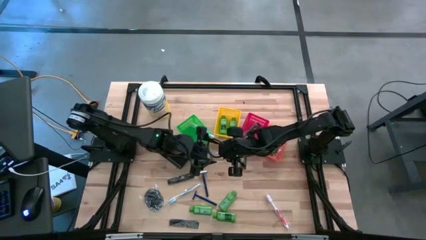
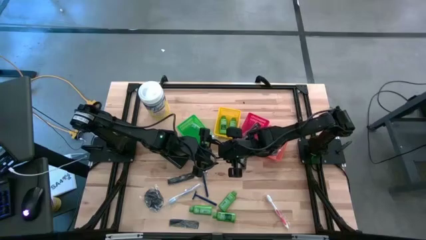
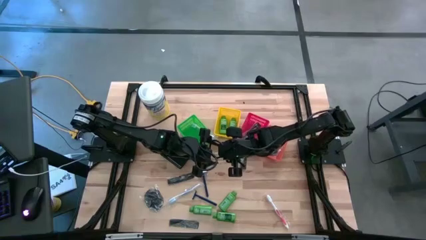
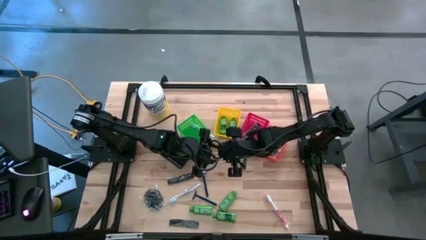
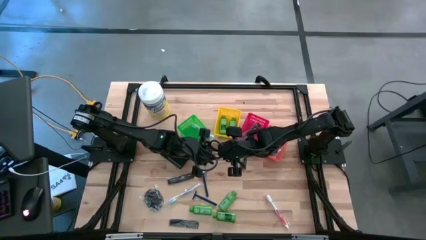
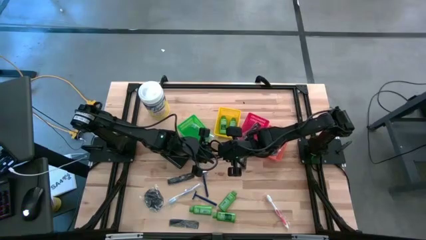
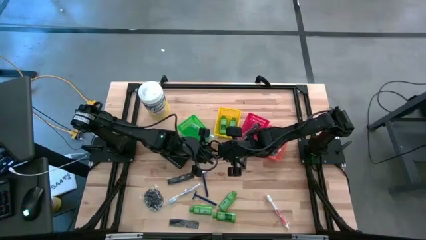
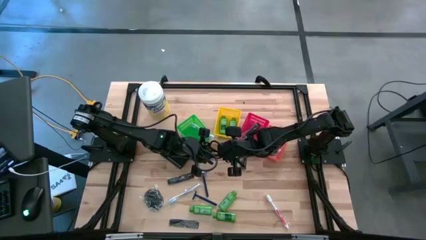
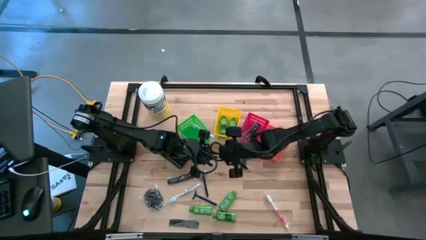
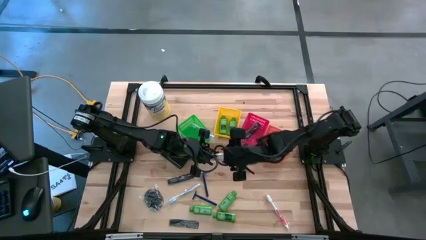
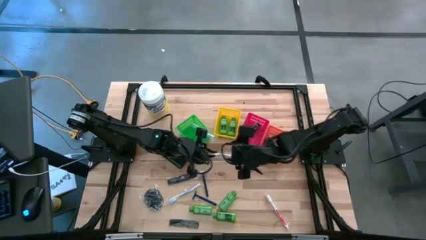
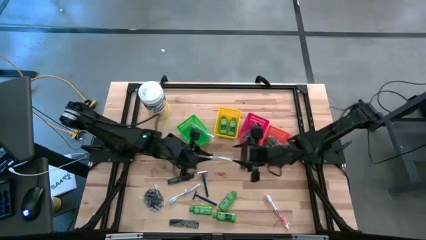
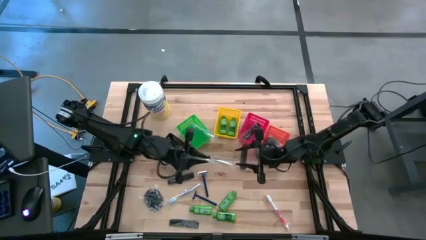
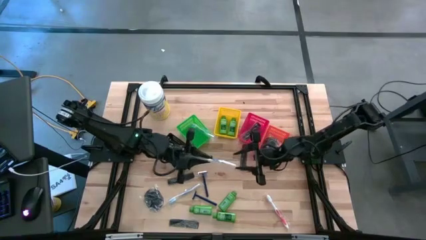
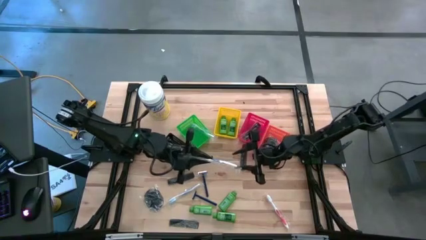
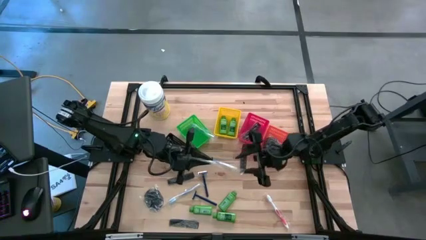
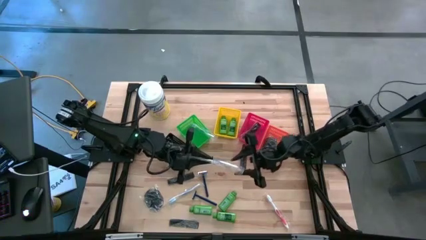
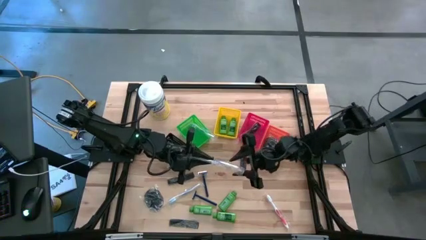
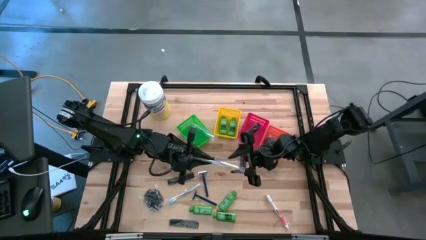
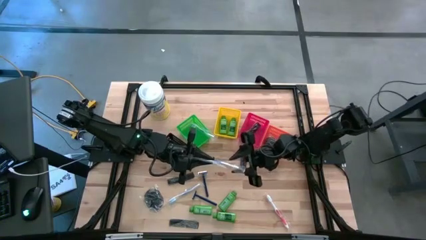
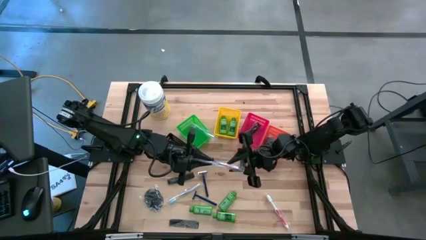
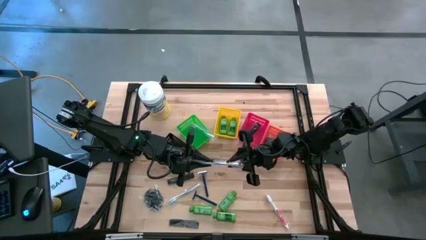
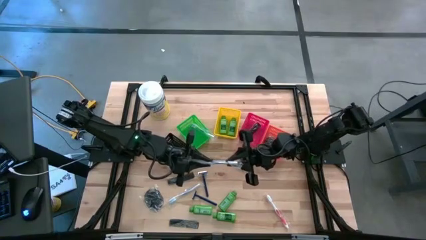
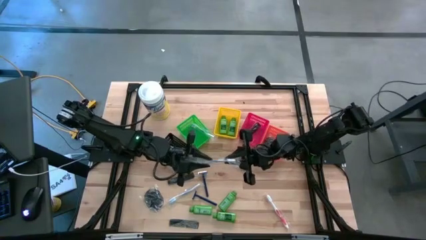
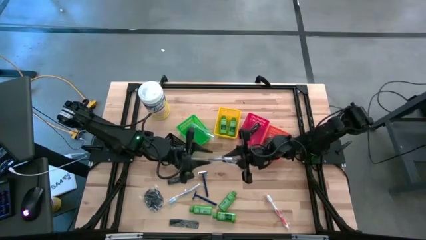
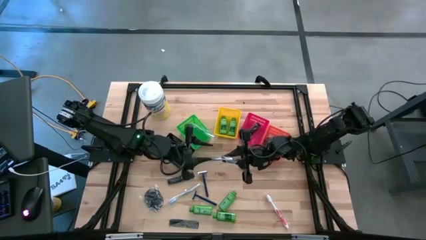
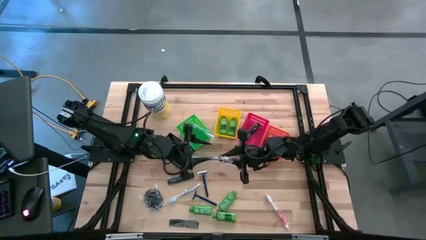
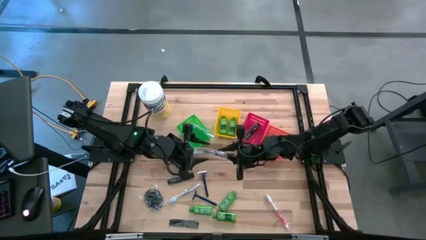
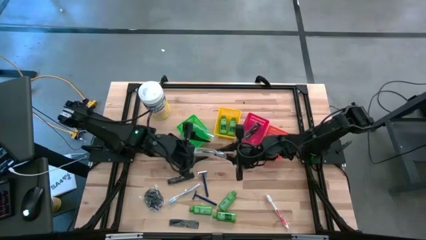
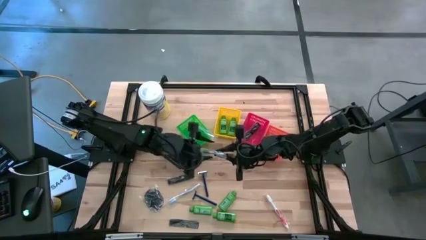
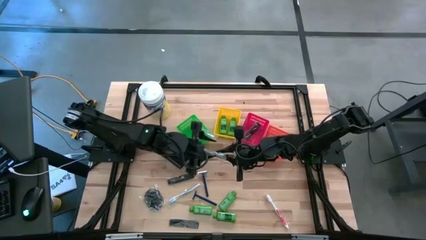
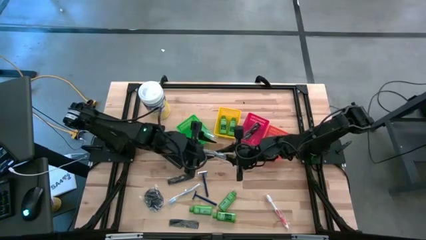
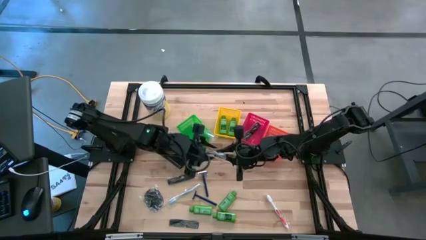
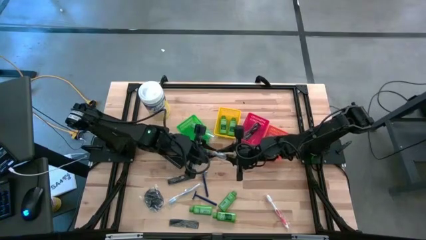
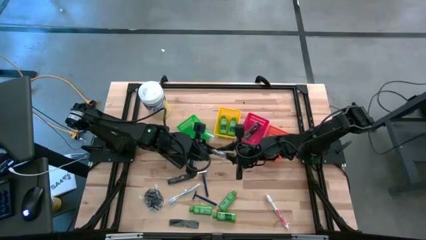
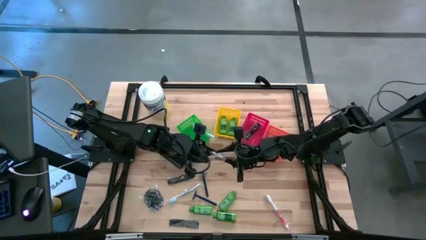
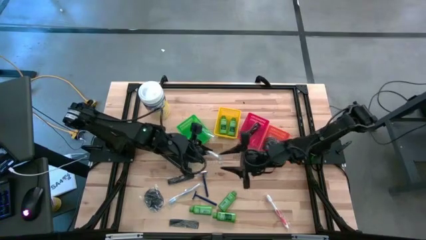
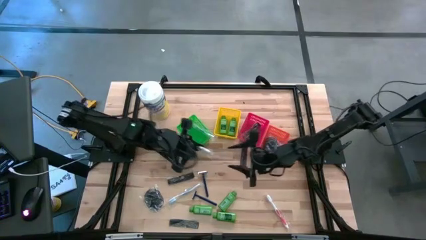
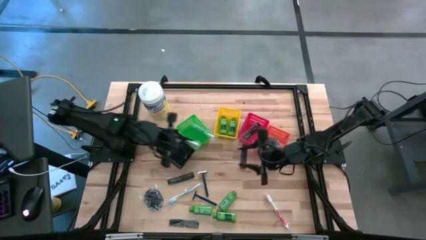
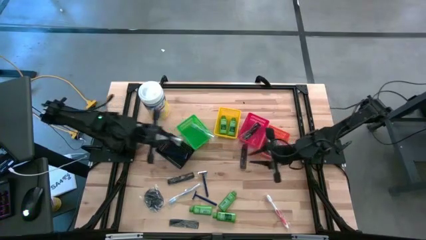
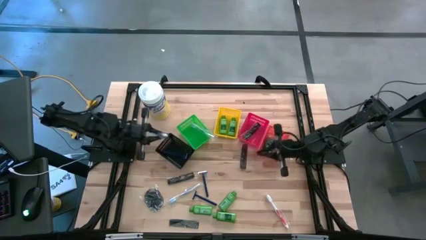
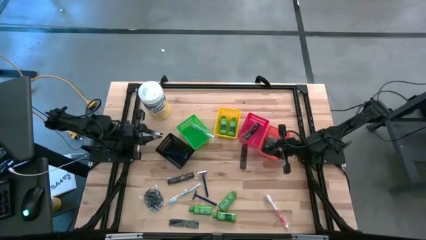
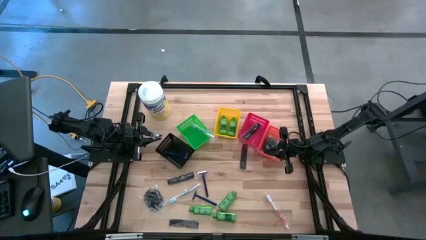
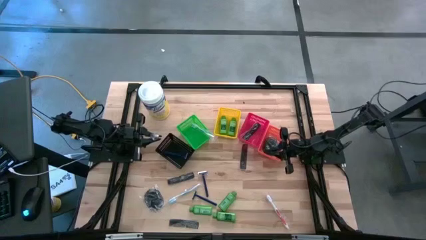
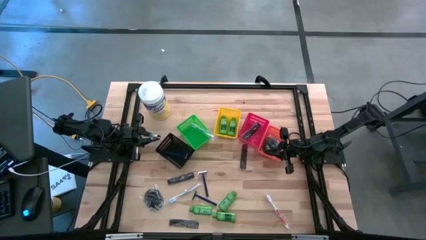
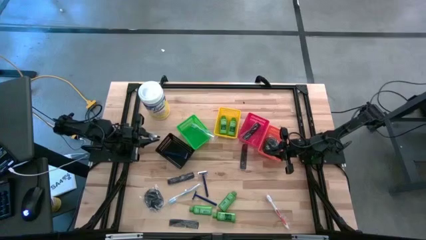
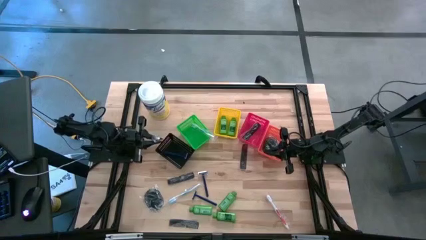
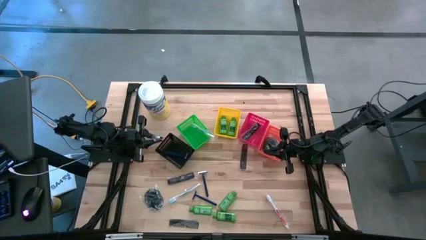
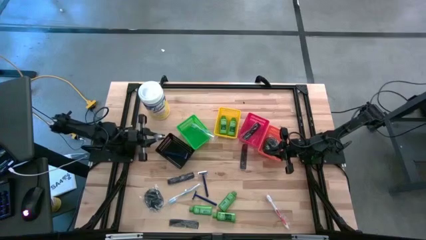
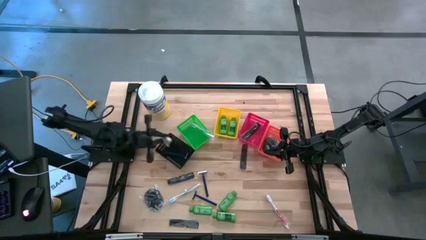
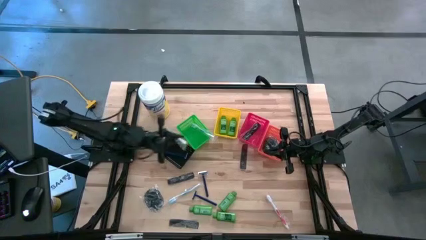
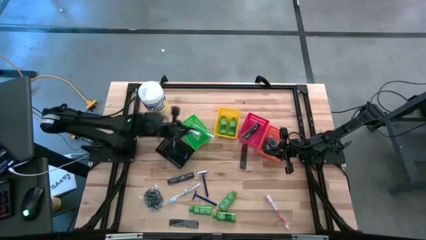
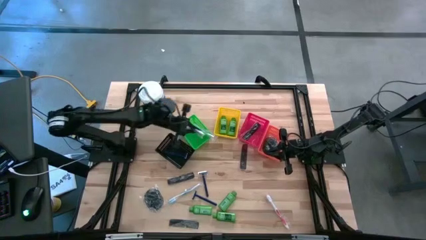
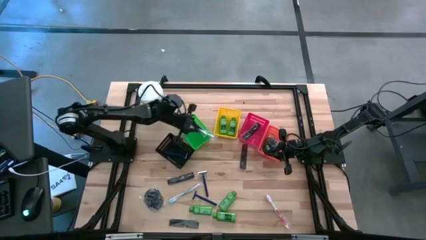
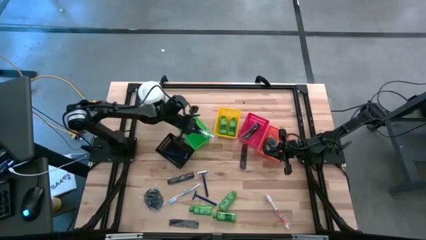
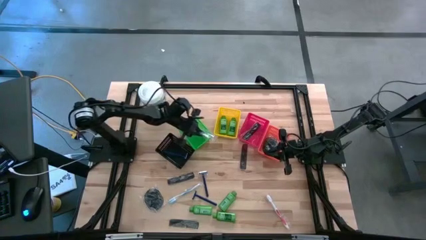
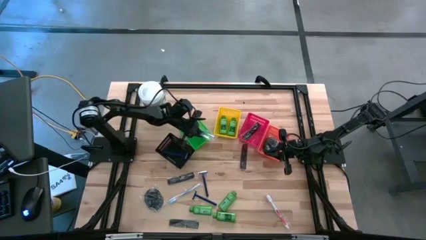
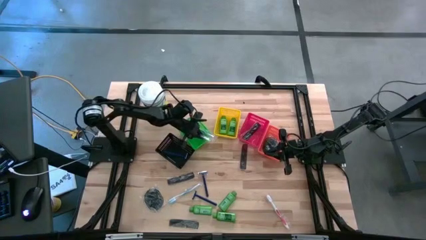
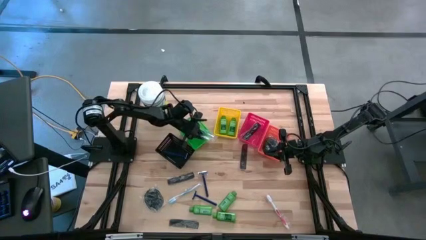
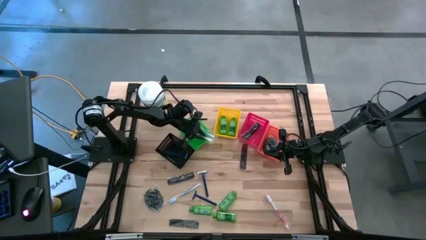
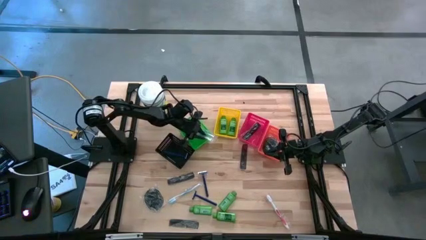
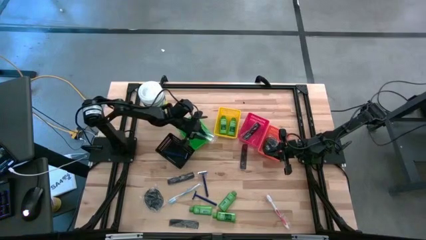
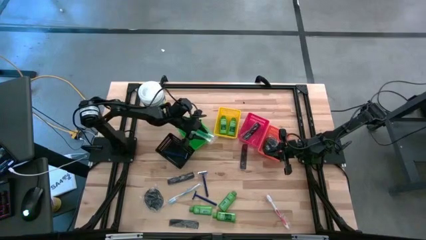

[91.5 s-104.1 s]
Task: Pick & Place Travel size toiletries
Put the blue toothbrush into the green bin

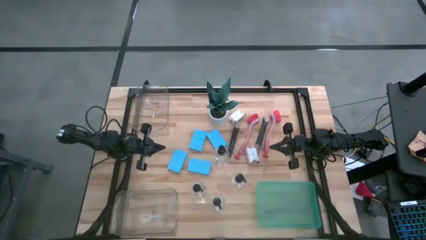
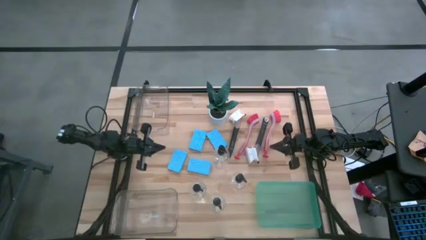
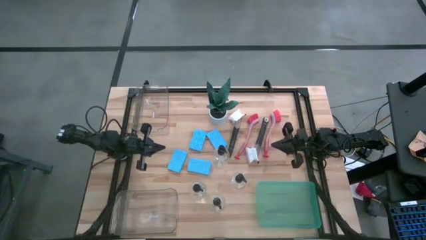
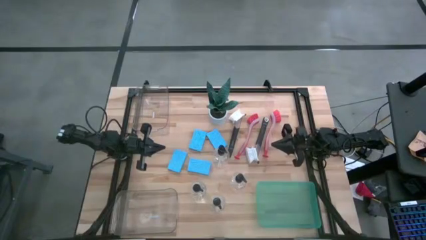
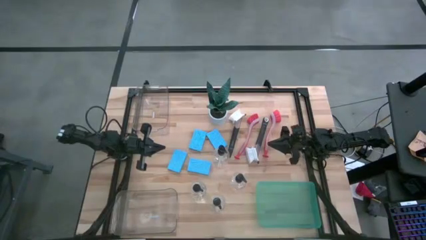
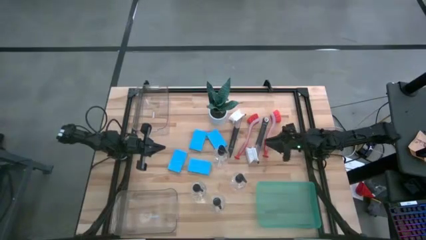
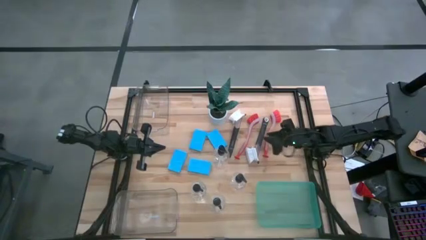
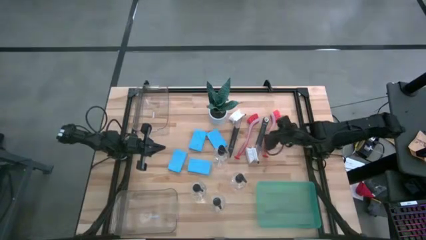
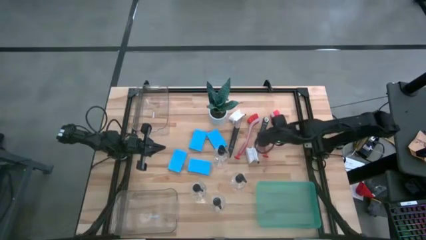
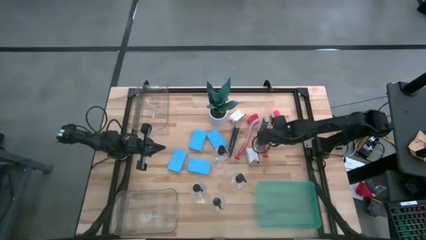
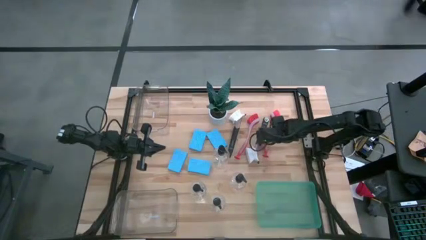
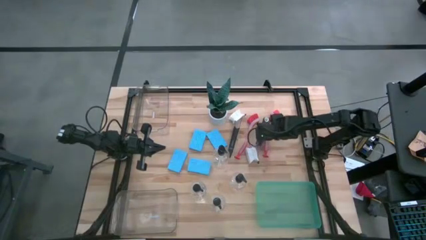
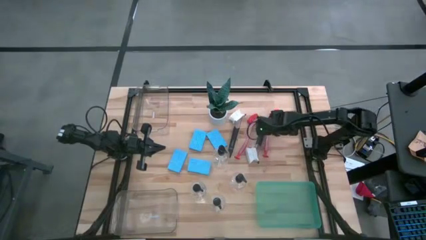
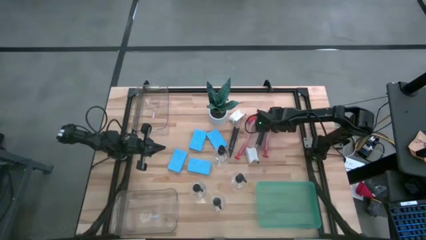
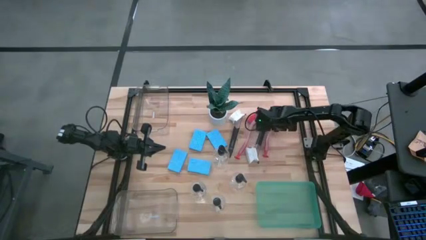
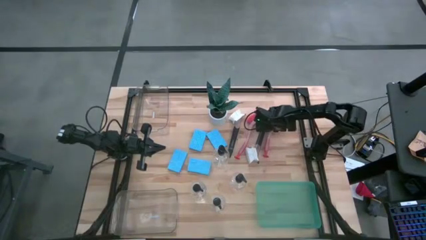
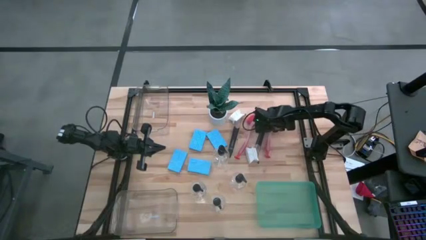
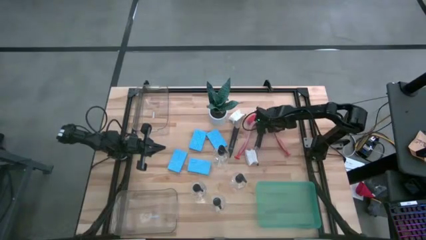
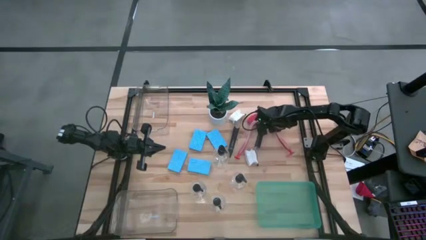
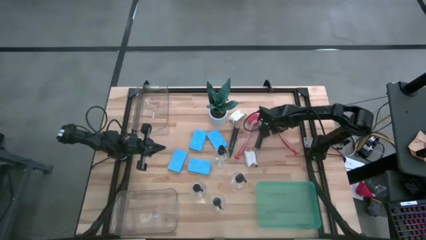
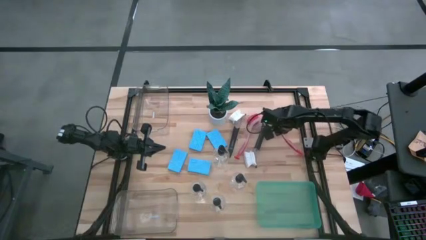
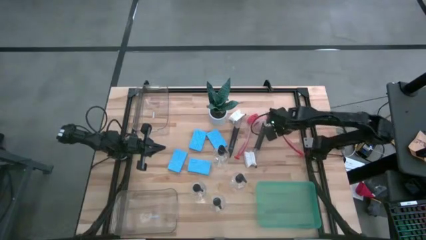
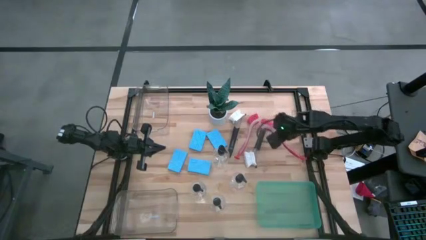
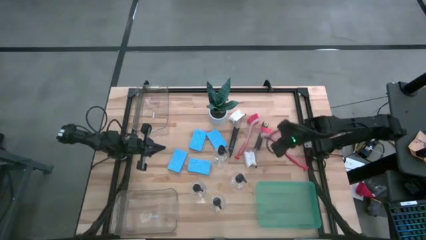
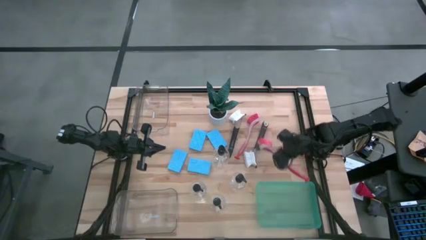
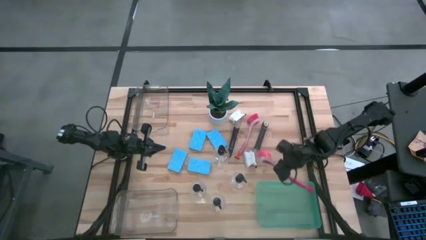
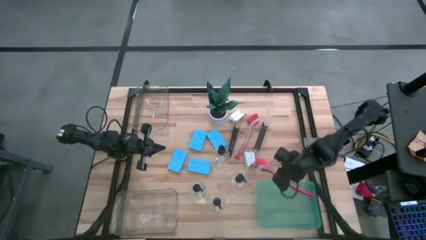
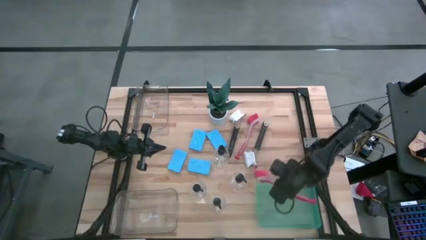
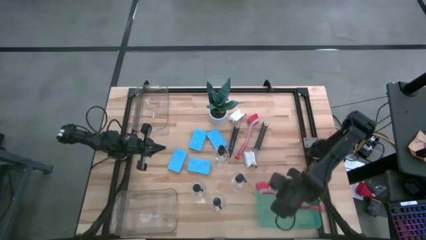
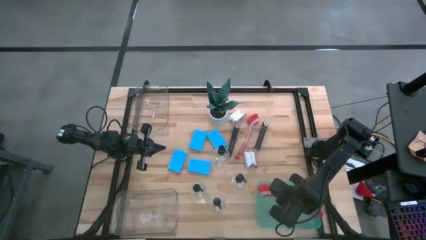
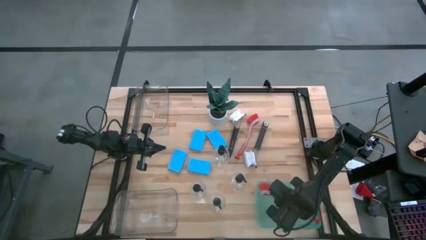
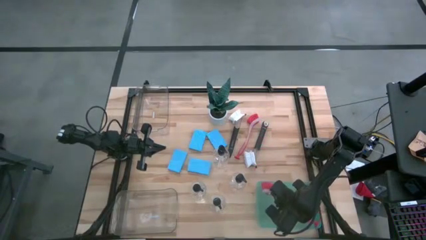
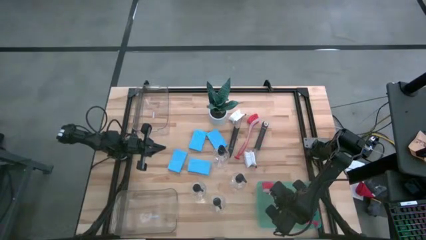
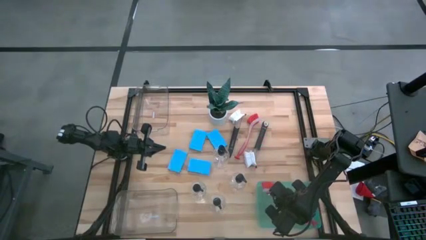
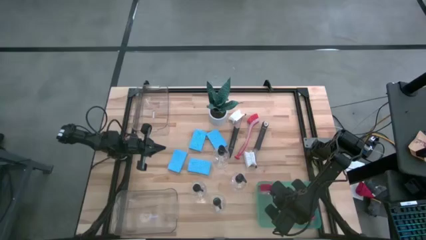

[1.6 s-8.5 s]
Task: Pick & Place Kitchen Sink Supplies
Put the red dish brush into the green bin
